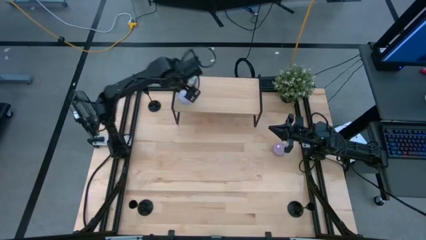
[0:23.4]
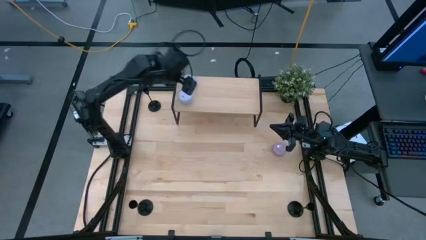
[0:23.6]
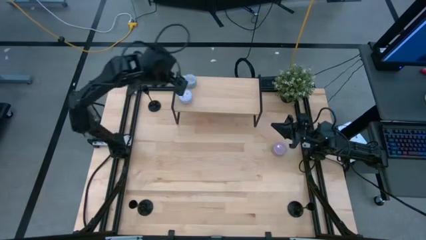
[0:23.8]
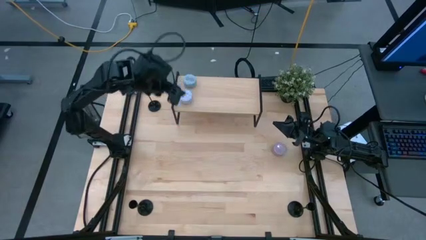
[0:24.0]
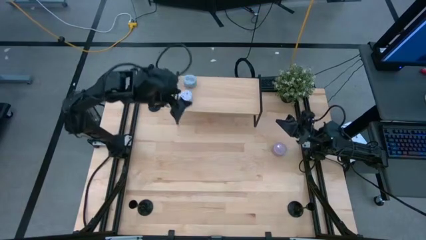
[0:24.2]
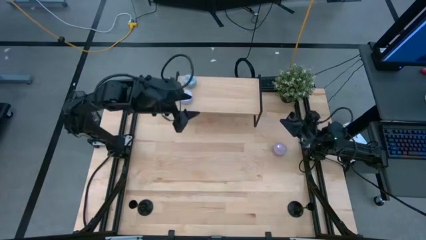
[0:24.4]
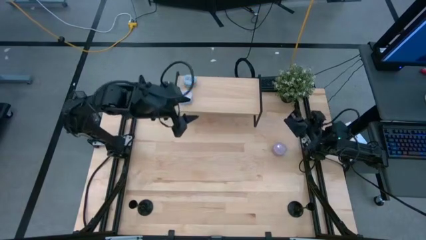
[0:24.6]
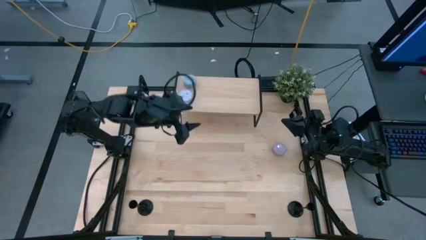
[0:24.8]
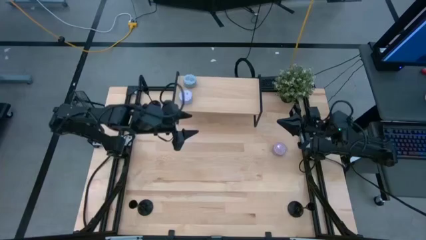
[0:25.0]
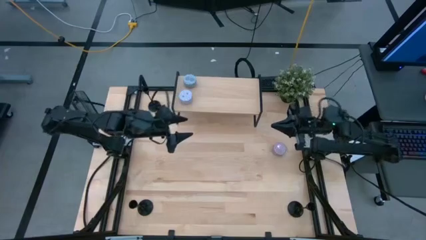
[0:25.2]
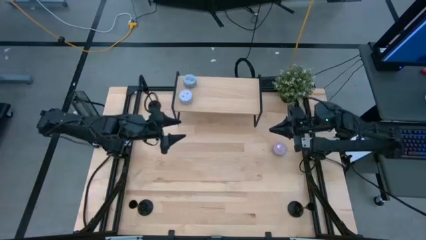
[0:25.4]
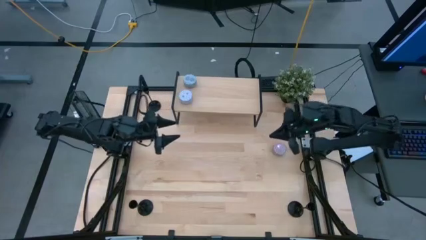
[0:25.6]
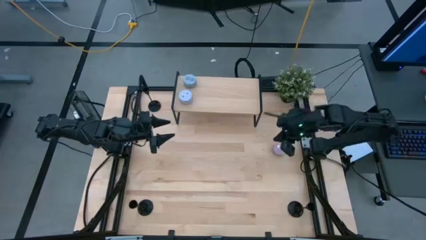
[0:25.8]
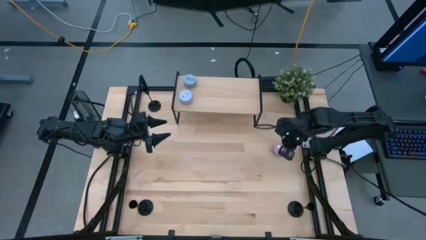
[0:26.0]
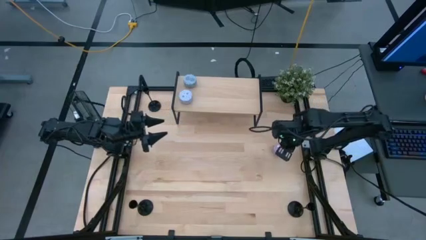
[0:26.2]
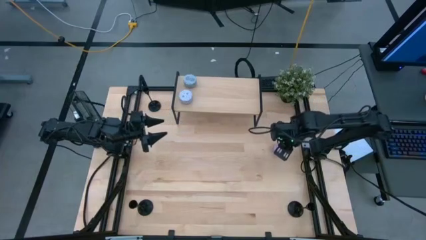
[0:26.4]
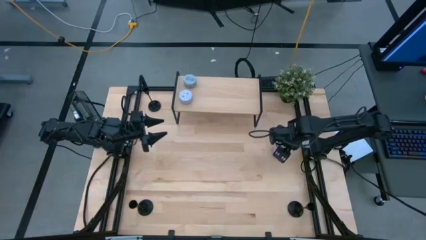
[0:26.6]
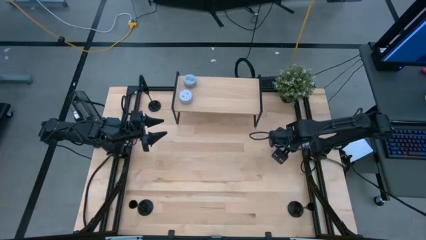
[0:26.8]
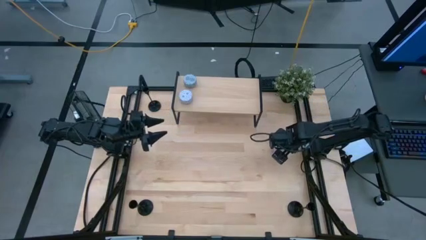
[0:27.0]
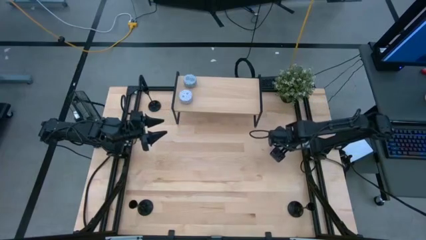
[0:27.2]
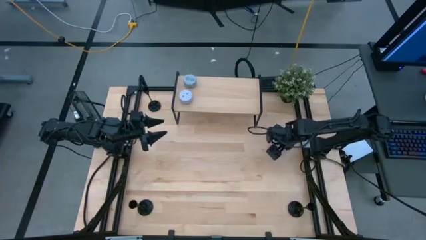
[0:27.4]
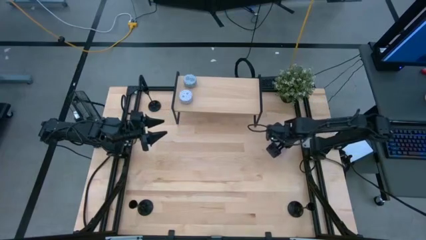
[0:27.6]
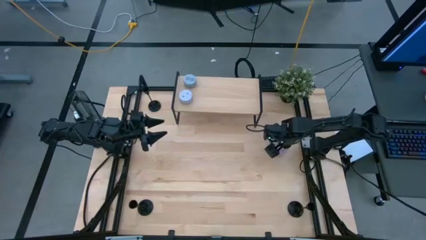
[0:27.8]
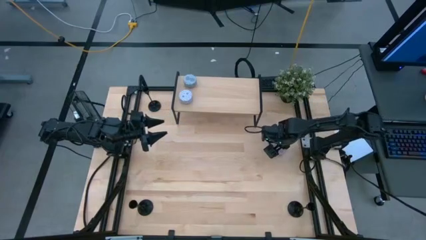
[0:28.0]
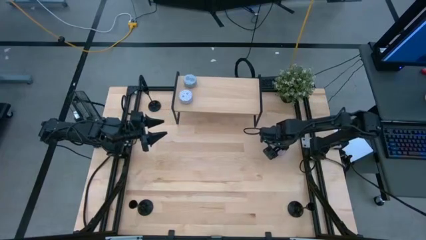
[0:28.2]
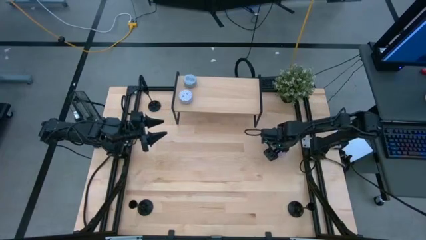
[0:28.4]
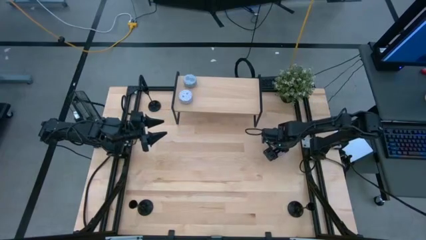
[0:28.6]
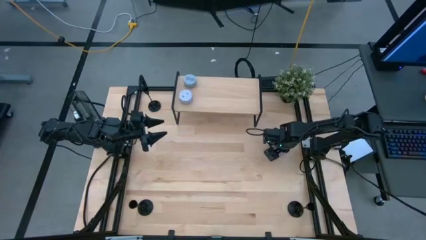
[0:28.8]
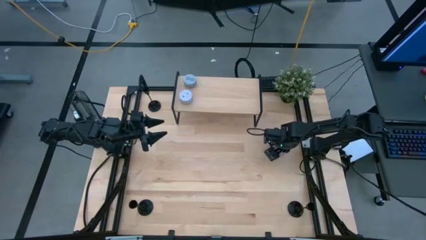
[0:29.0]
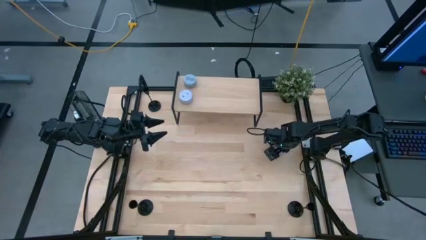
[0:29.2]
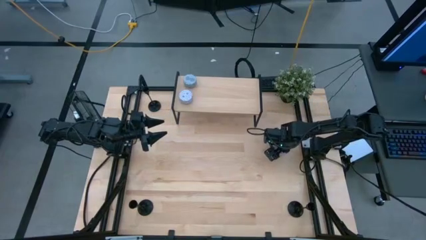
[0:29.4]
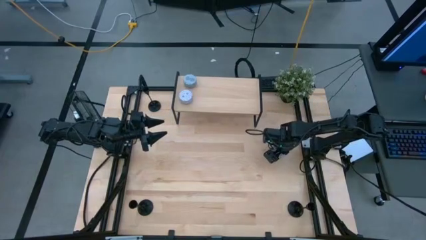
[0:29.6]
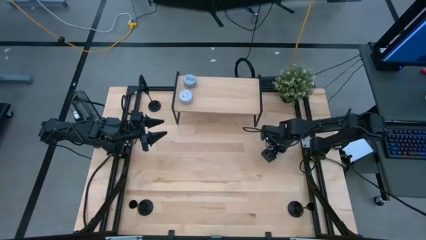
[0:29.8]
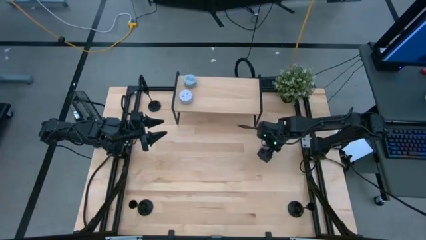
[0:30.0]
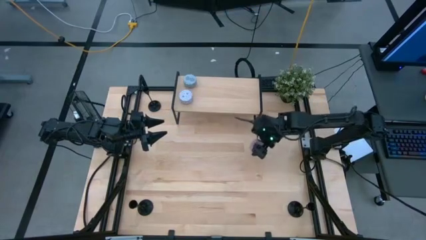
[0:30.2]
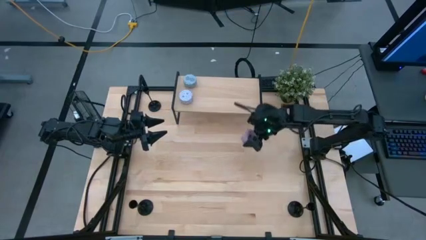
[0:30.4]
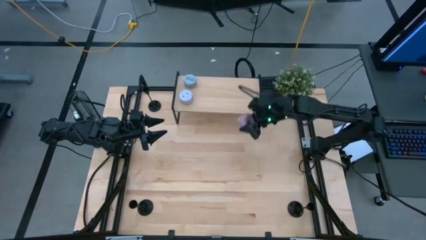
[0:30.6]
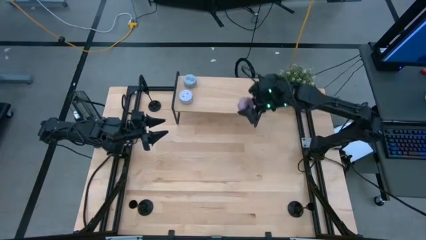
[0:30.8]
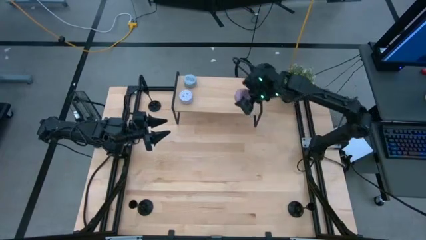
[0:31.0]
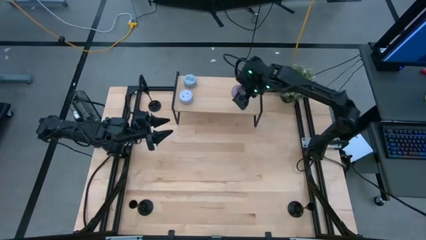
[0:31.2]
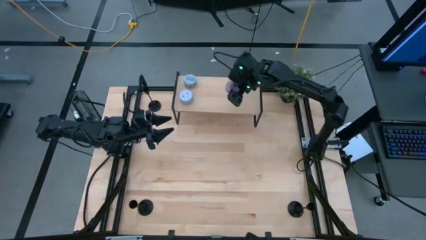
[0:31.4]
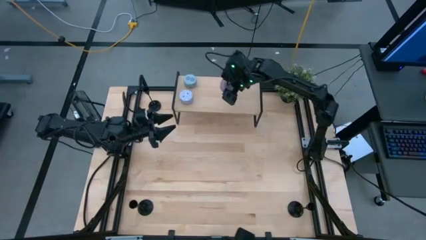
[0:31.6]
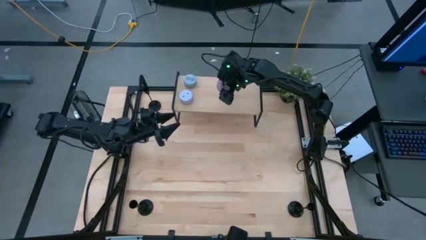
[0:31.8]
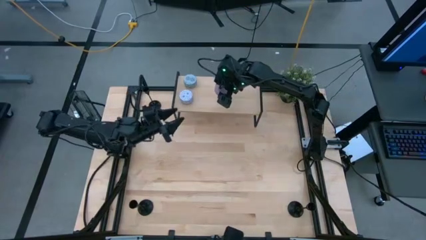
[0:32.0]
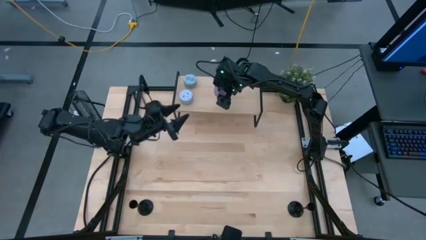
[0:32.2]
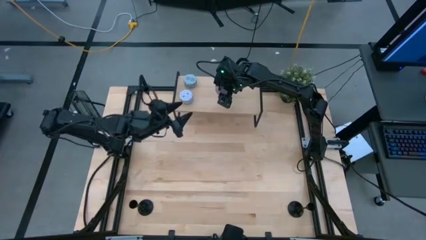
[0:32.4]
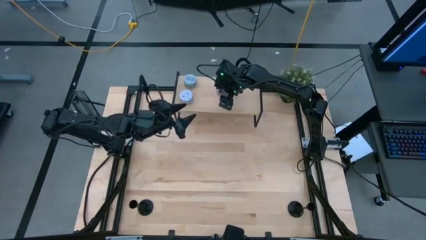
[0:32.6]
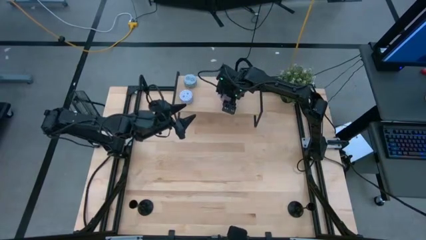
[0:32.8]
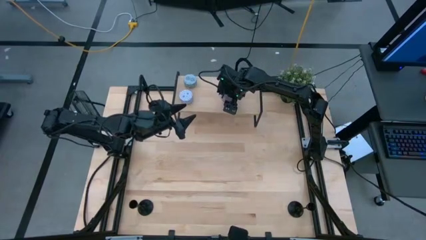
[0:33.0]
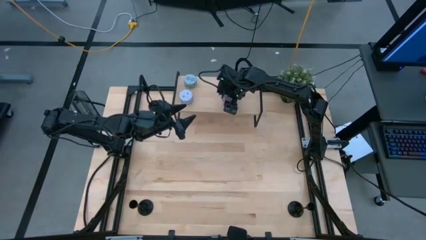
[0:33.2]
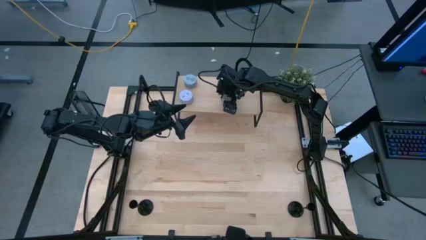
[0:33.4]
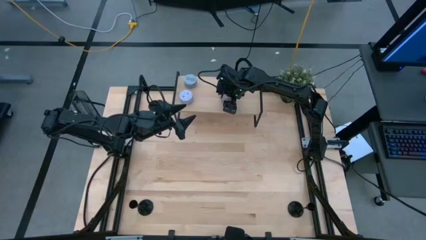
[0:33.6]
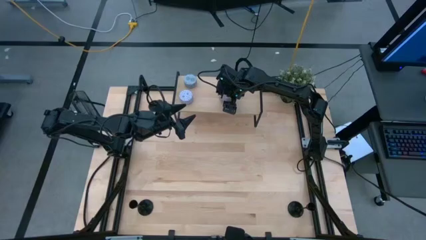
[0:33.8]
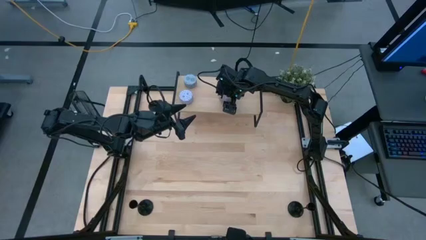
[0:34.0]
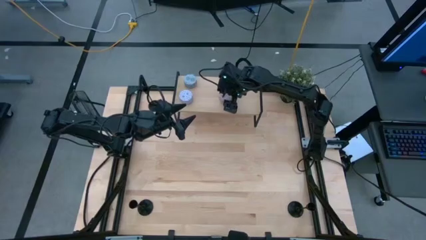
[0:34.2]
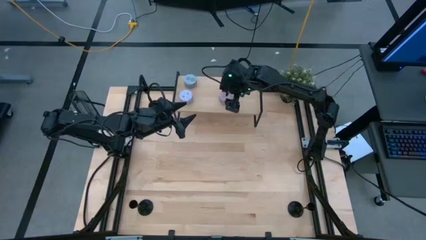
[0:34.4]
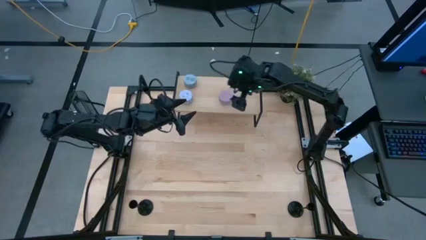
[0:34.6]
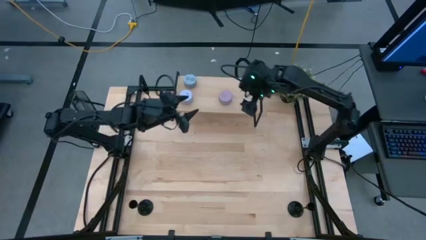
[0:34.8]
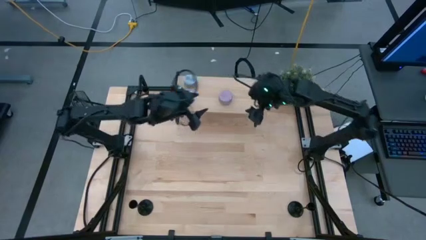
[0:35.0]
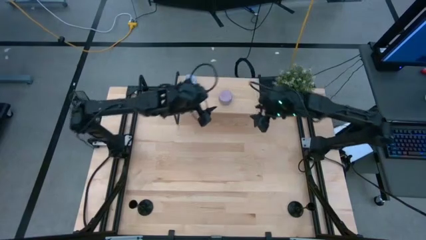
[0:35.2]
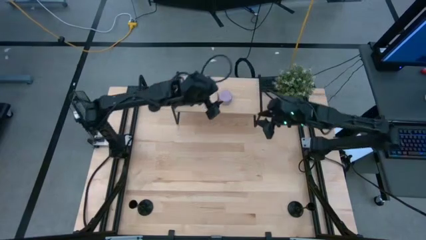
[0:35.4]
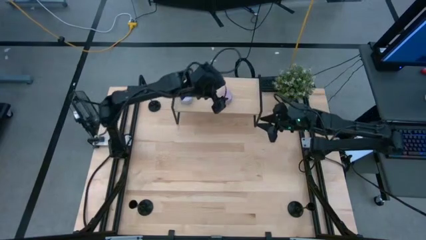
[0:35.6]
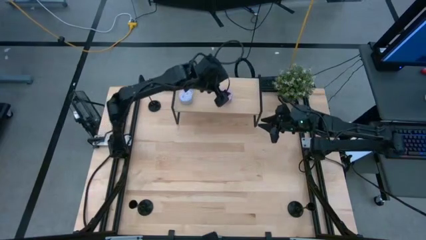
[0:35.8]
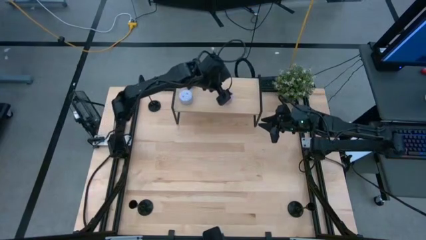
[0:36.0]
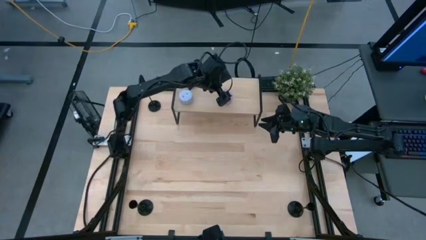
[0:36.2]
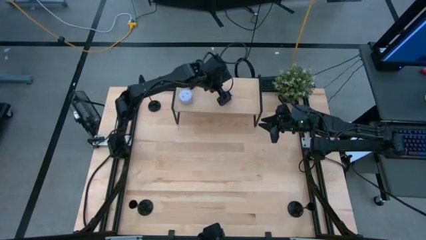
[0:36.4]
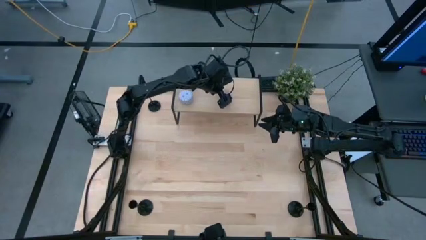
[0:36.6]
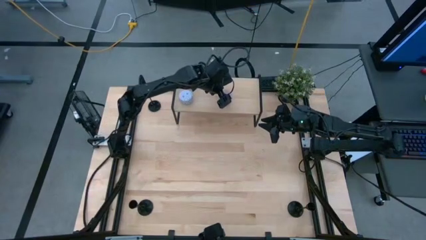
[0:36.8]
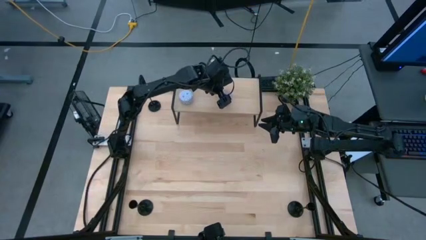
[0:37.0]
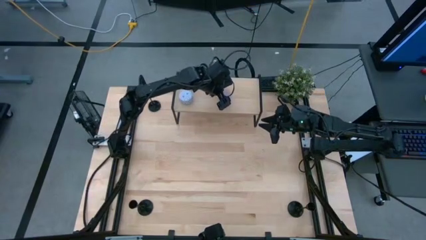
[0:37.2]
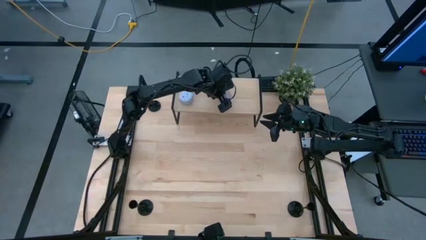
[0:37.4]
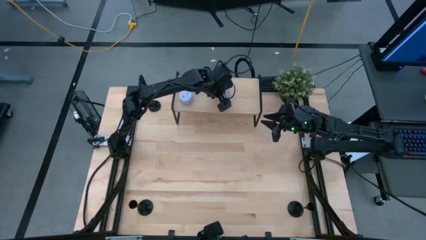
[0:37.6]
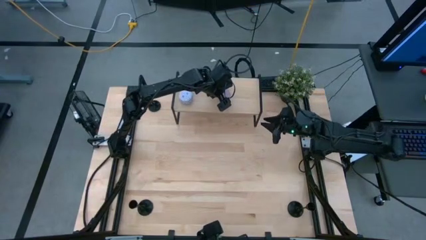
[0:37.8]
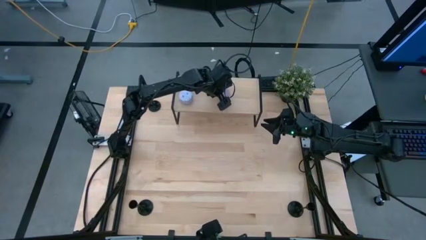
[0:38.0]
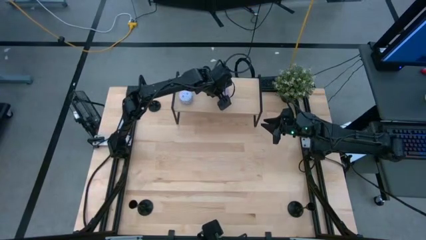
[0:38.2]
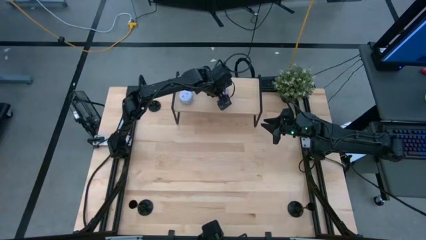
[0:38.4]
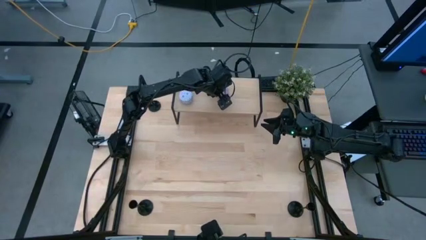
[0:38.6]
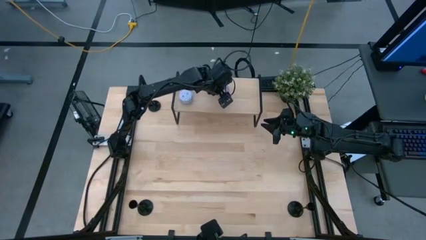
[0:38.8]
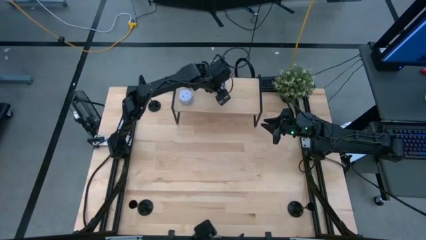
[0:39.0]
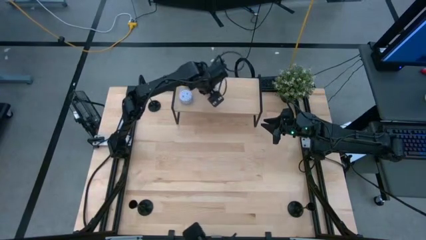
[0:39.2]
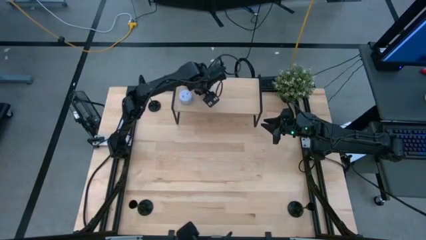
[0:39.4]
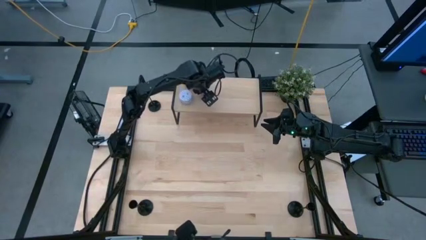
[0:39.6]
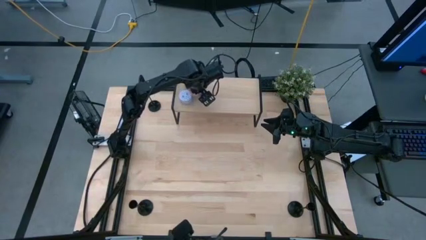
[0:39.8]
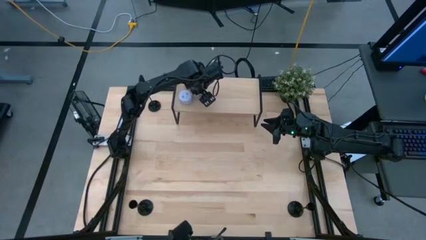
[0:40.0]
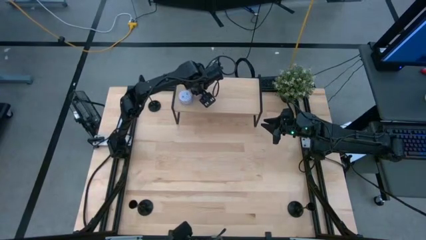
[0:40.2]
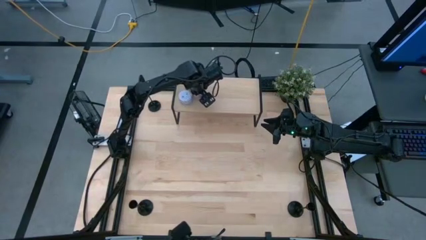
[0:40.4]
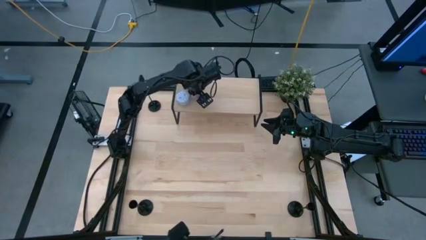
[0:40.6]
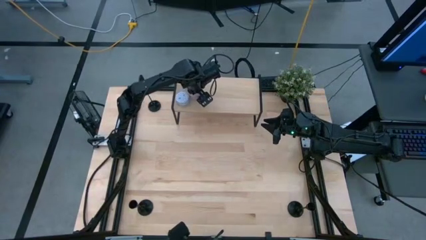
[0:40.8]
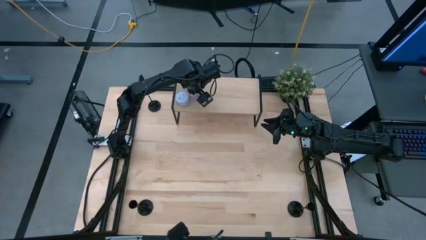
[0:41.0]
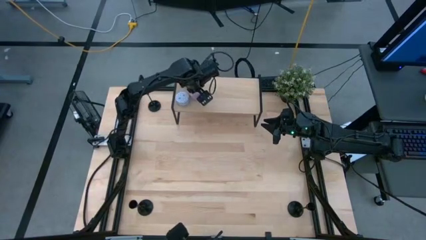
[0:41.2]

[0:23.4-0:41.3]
Task: Pick & Place candle stick holders
Put the pink scented candle on the shelf
